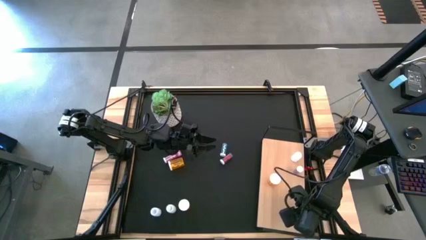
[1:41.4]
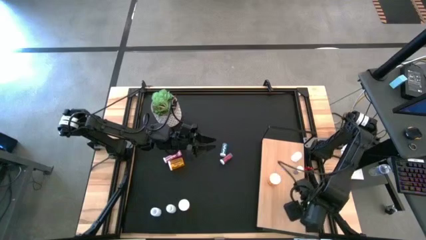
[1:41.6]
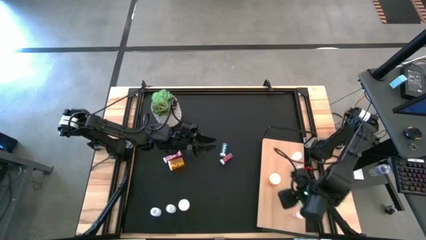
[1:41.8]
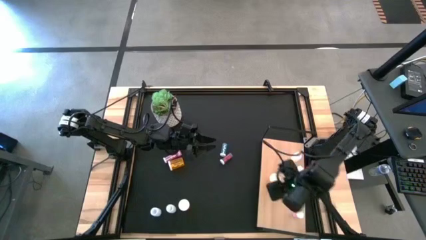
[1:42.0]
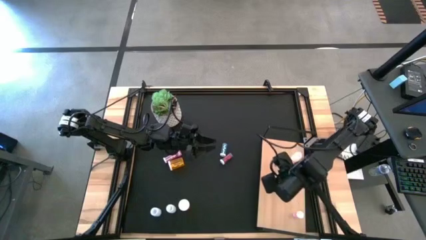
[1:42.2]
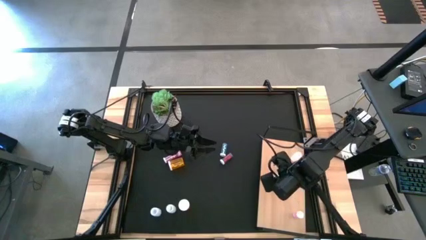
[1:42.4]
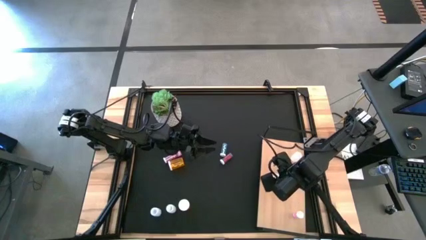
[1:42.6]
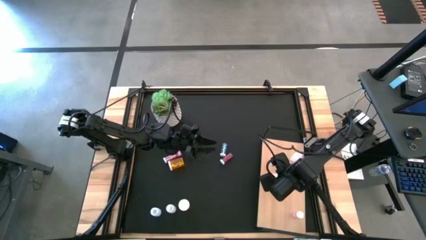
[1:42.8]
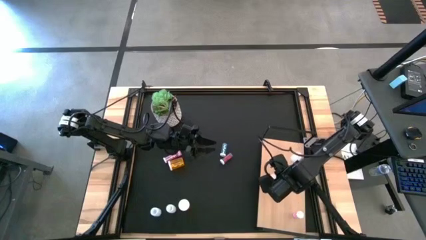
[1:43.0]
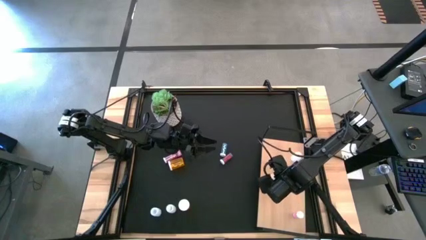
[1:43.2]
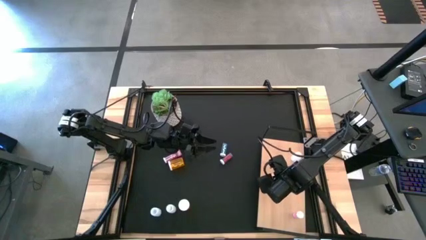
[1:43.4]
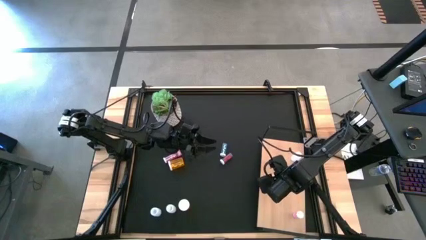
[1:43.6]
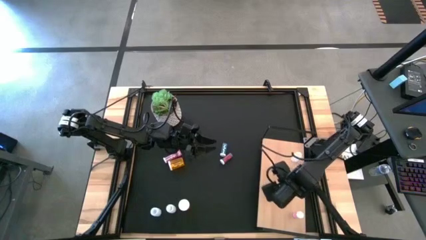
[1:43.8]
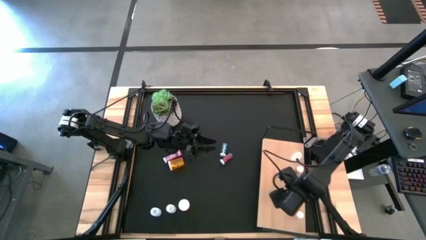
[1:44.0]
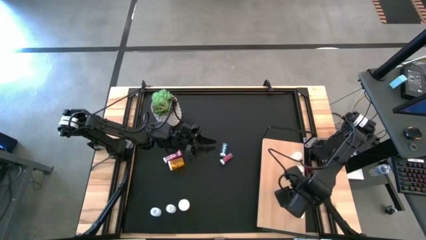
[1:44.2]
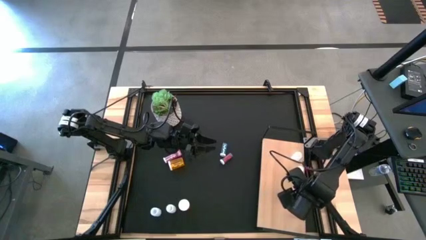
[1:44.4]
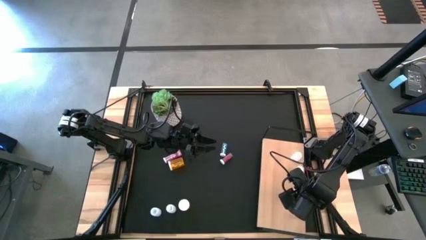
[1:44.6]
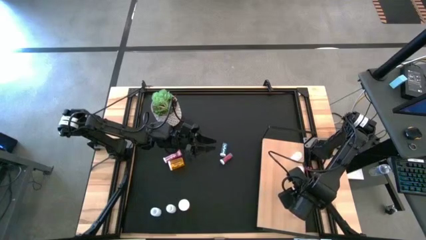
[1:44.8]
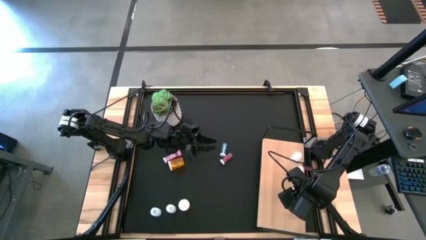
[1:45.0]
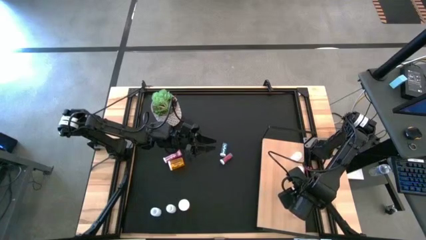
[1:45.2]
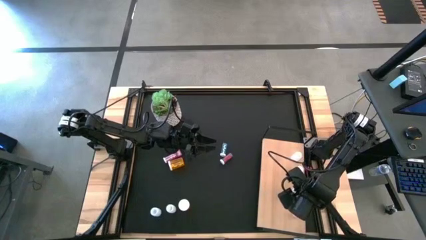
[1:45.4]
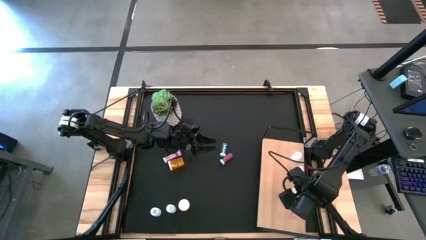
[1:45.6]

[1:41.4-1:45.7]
Task: Pick and place medicine bottles onto shelf by color
Adjust the orange pill bottle on the shelf

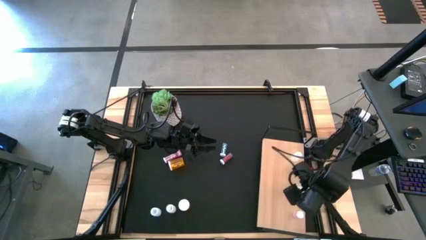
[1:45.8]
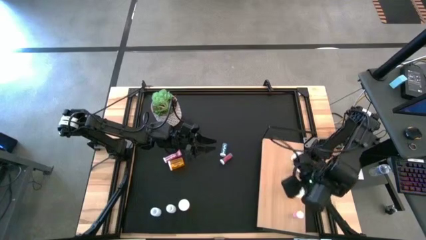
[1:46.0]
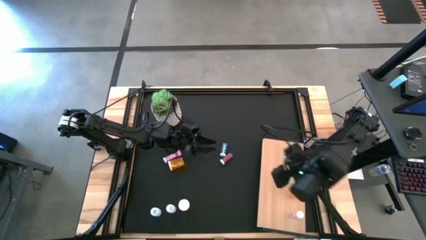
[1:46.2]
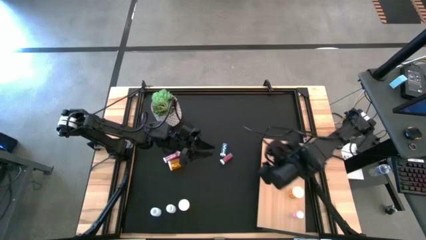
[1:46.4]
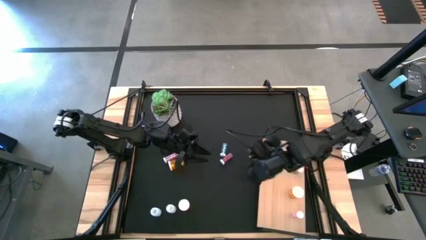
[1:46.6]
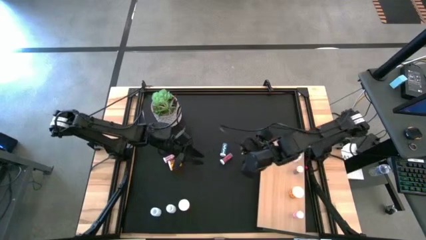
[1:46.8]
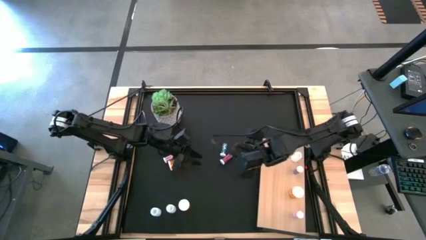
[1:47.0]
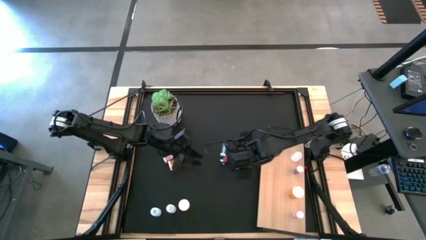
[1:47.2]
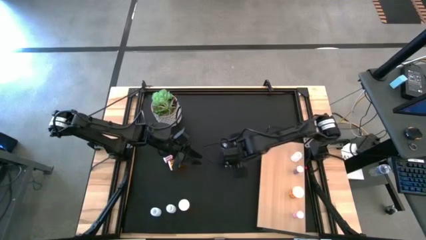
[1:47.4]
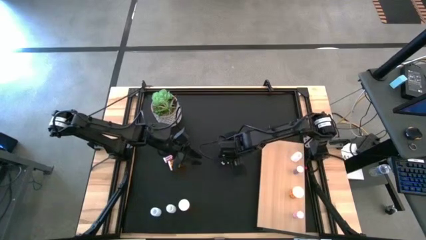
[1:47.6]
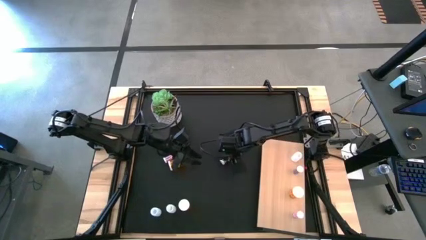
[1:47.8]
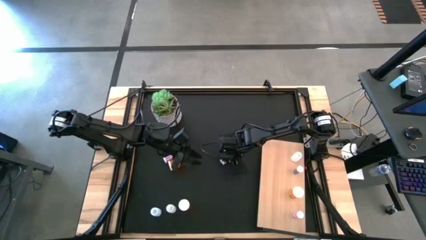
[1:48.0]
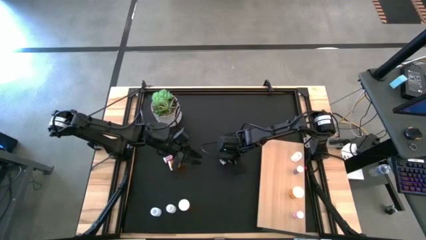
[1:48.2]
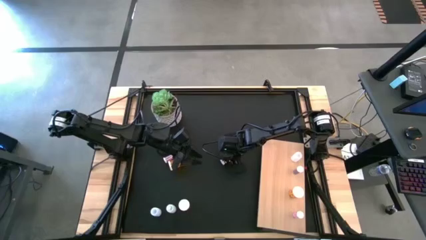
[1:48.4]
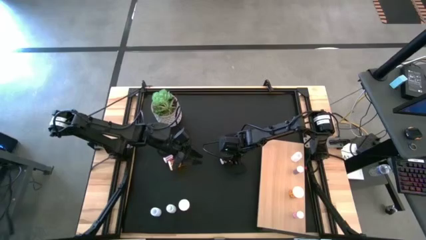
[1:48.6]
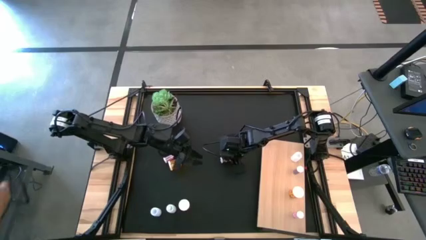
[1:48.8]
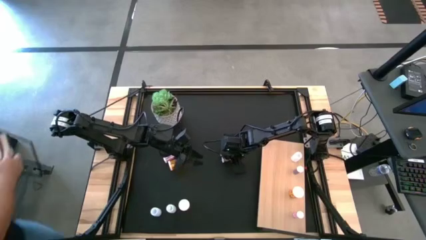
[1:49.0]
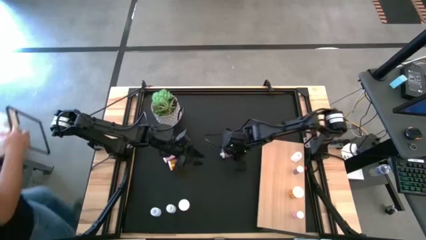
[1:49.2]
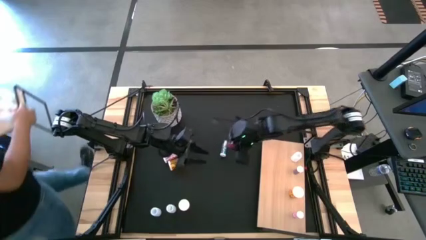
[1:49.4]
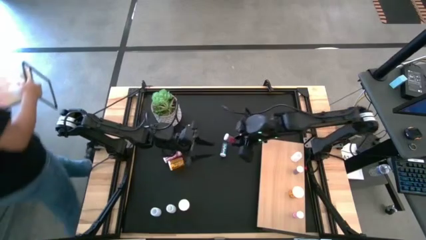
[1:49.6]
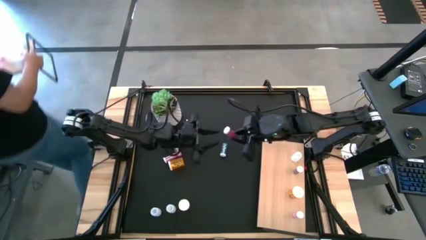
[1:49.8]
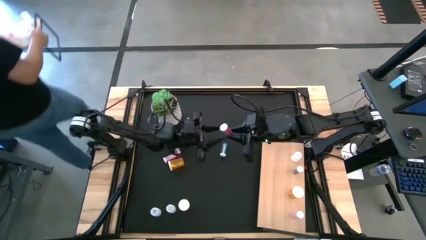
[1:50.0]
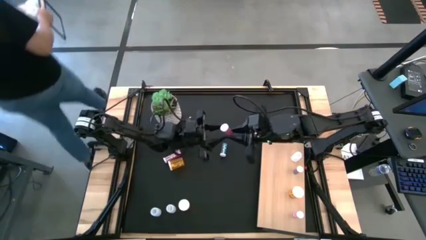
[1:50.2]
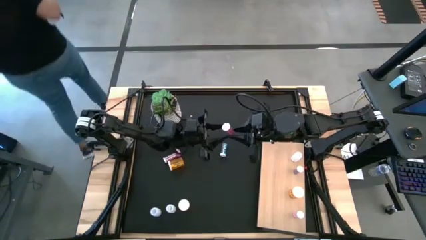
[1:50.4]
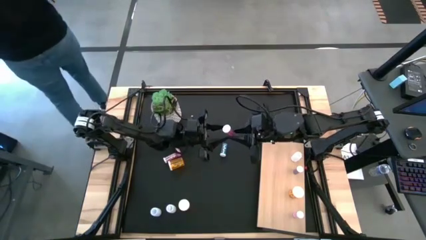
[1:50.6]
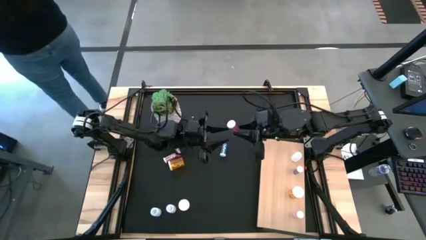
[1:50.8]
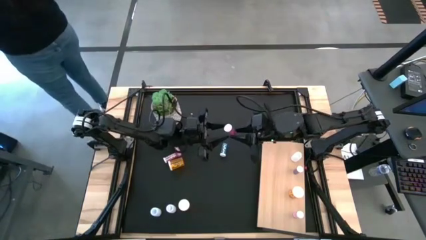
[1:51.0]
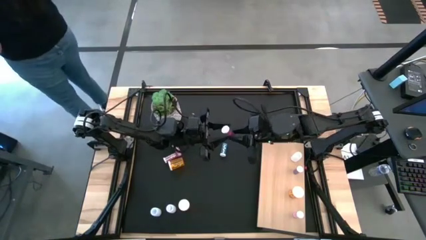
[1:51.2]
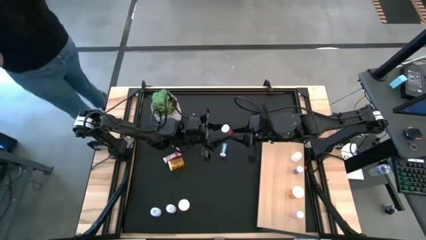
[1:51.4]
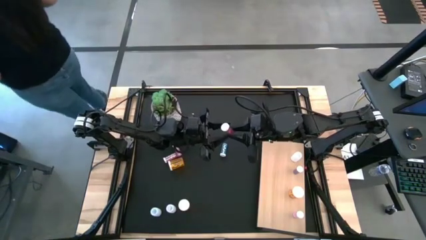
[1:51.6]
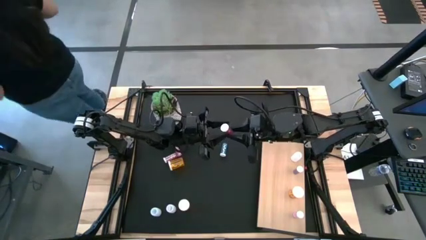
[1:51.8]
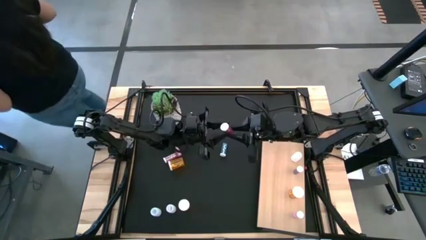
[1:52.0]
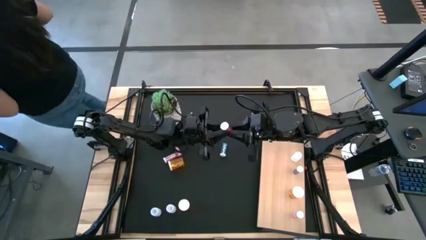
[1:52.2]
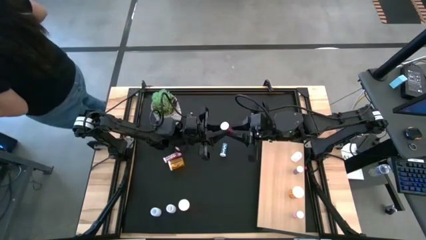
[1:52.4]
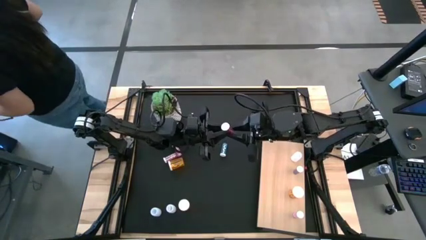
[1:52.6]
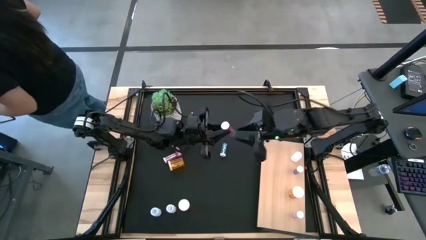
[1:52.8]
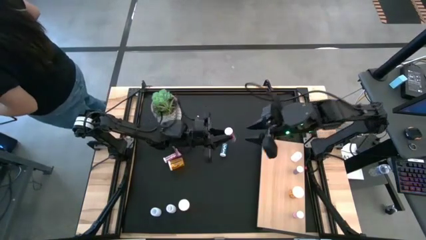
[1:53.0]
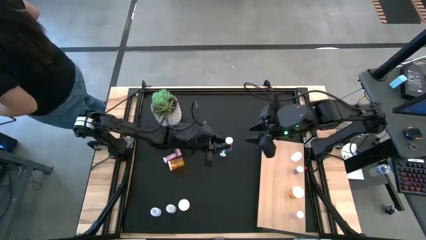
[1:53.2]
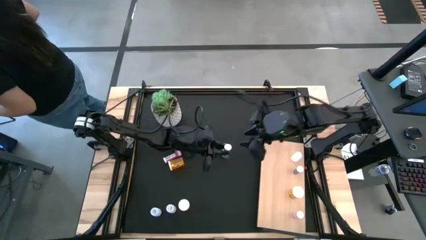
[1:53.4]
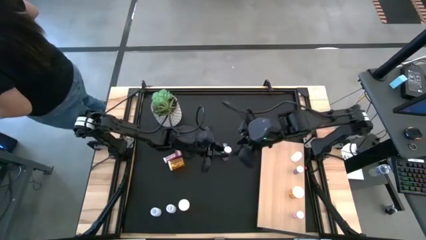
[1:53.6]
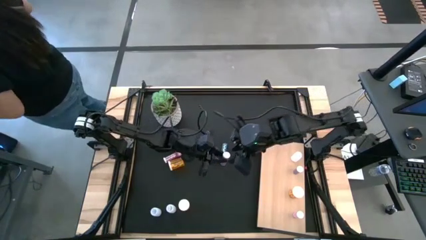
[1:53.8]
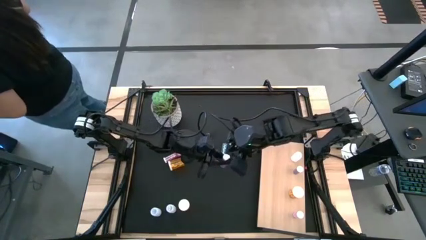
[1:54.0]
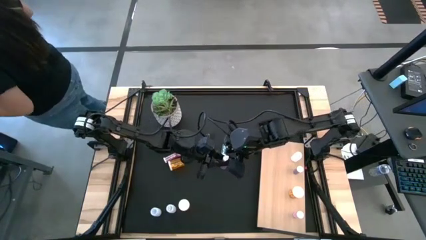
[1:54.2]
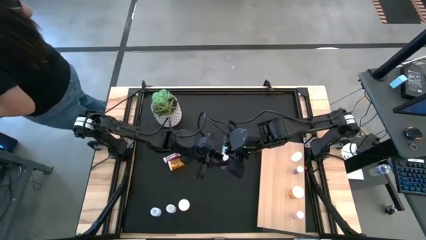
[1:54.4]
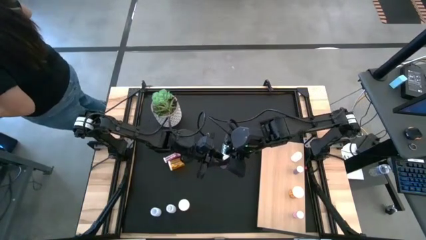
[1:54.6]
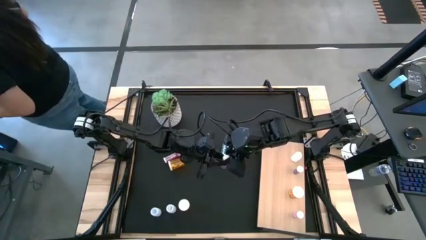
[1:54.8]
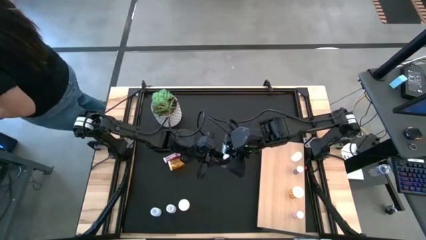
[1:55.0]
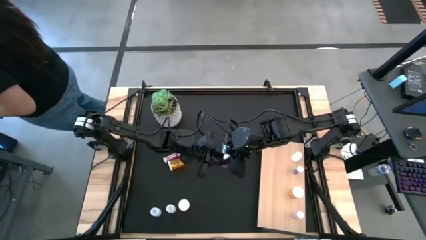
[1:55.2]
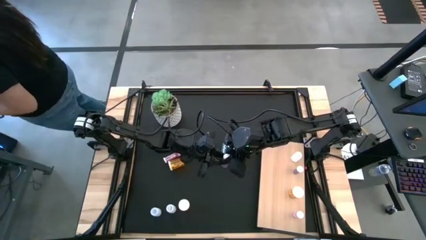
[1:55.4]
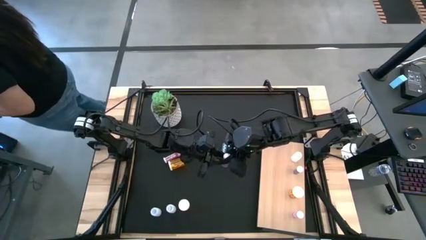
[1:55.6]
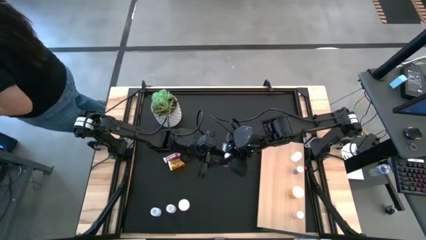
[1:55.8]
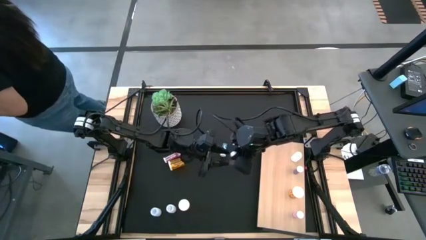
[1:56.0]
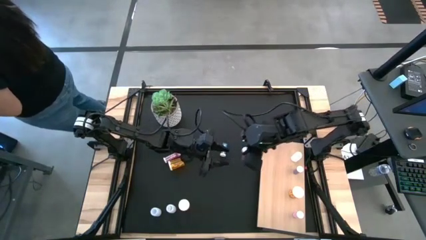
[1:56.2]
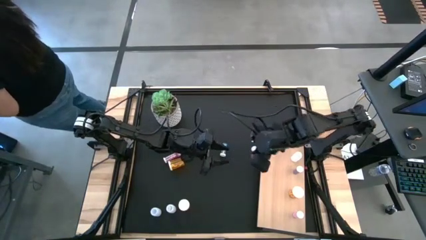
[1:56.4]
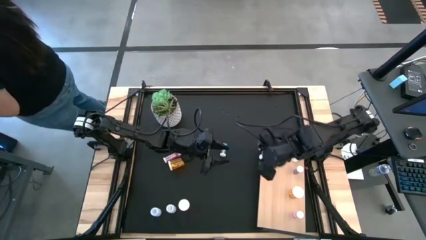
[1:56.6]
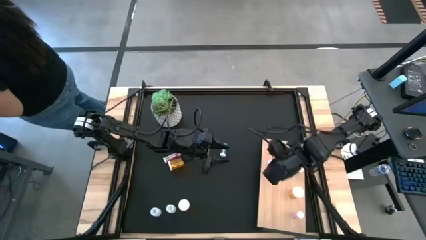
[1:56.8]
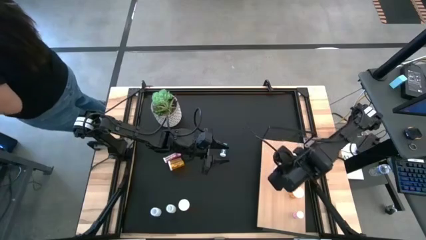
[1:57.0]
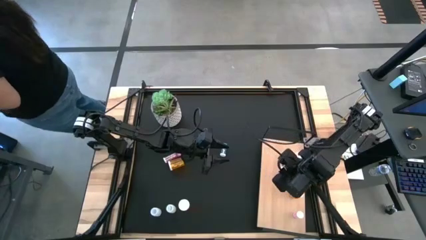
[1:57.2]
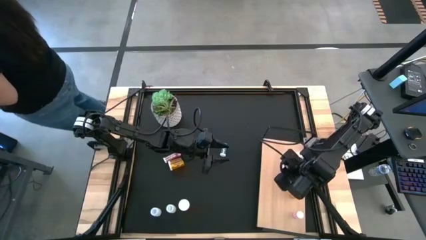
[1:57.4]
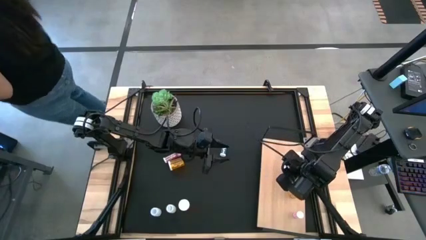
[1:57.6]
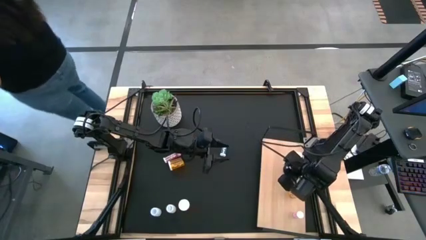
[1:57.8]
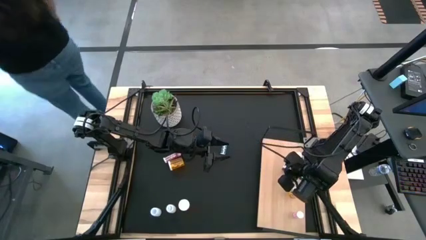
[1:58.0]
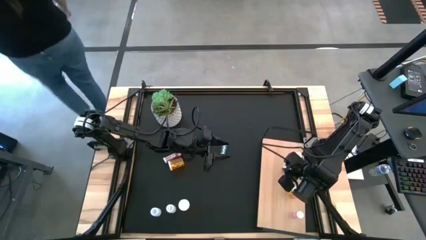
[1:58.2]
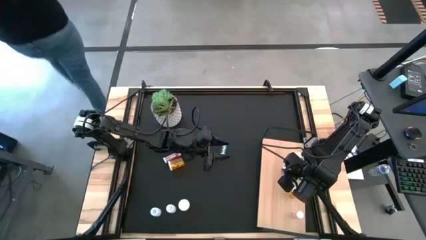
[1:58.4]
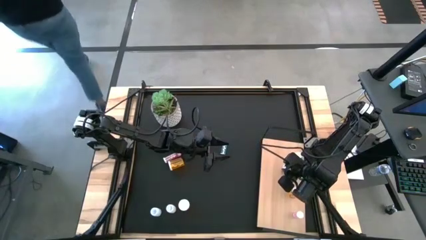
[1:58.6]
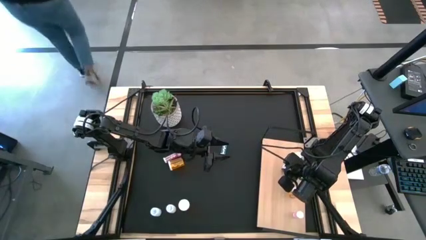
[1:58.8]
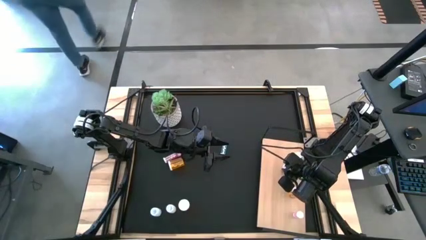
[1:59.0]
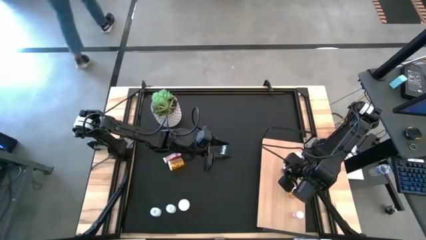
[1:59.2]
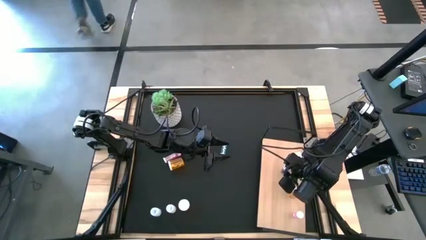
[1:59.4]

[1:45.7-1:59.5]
Put the bottom blue pill bottle on the shelf aligned with the other blue pill bottle
